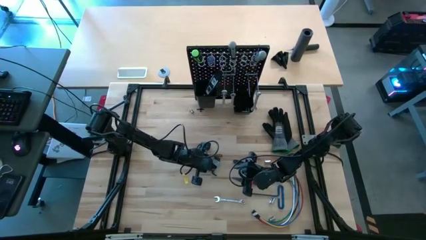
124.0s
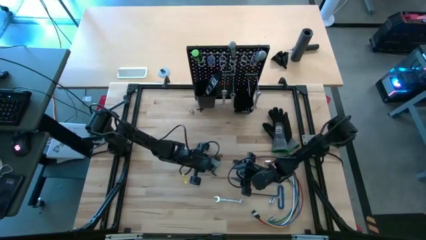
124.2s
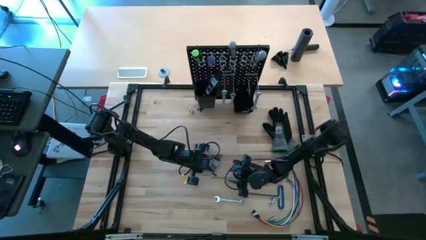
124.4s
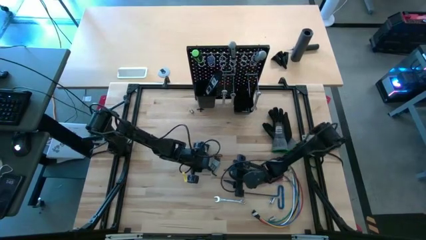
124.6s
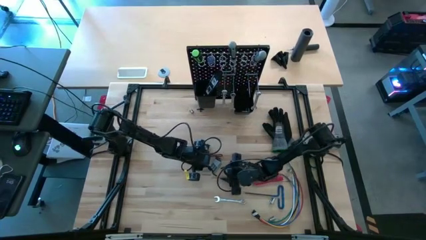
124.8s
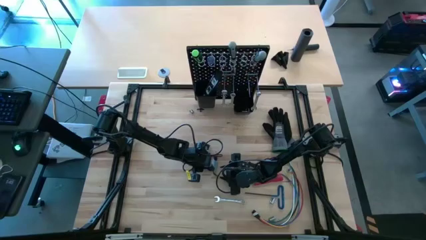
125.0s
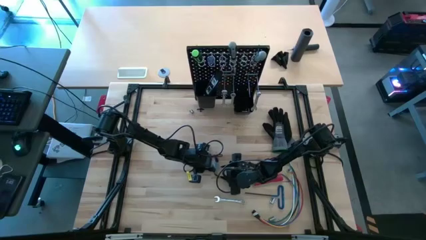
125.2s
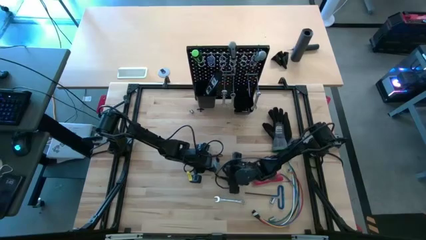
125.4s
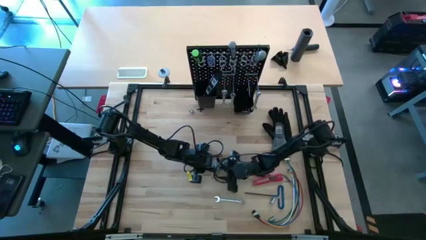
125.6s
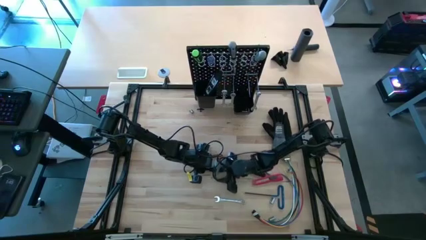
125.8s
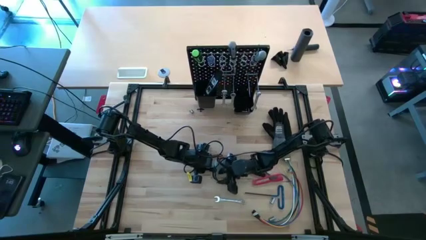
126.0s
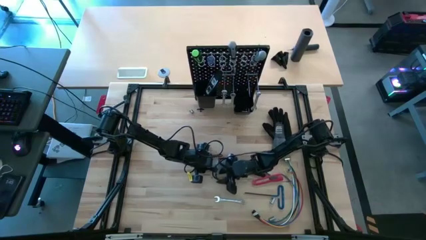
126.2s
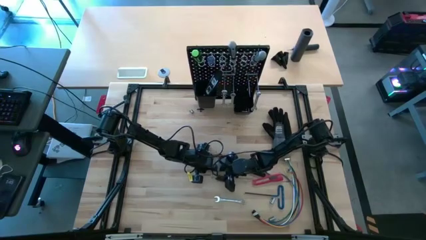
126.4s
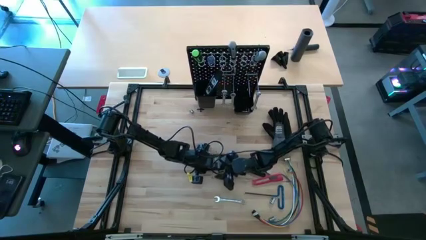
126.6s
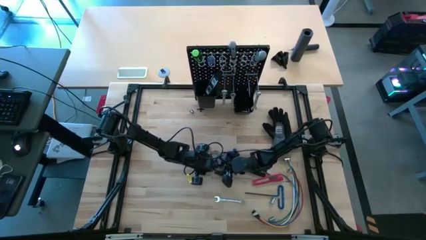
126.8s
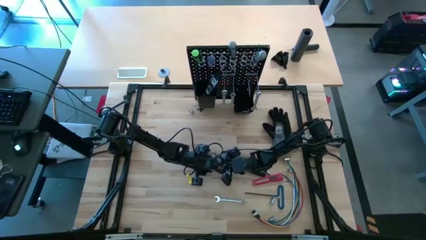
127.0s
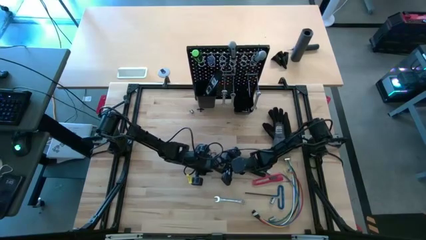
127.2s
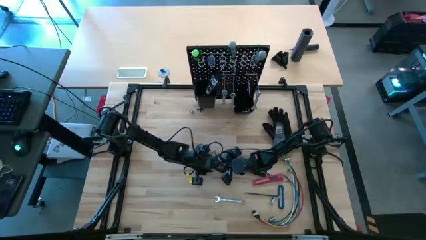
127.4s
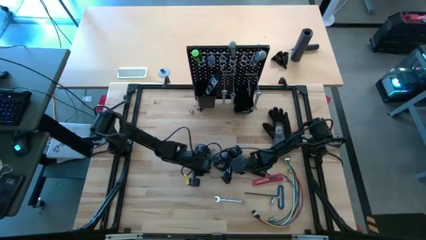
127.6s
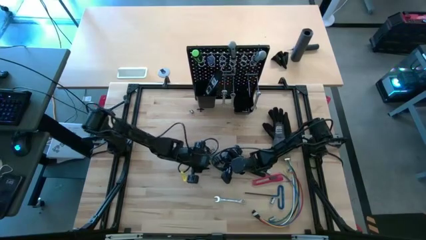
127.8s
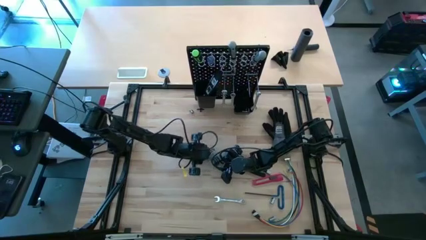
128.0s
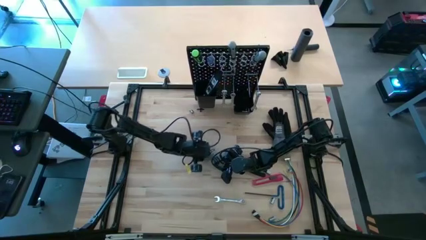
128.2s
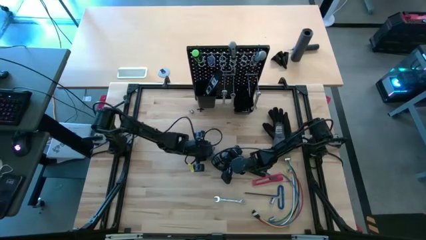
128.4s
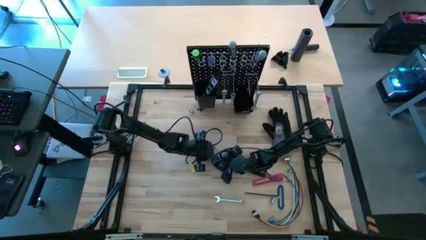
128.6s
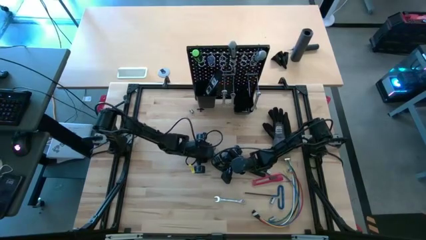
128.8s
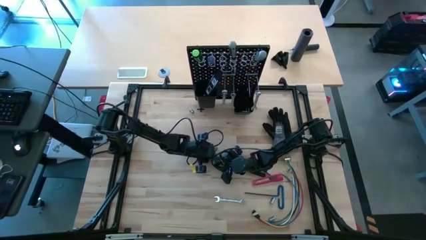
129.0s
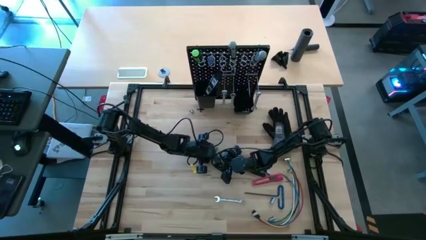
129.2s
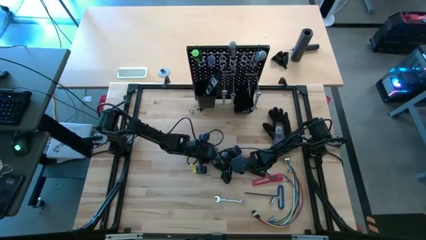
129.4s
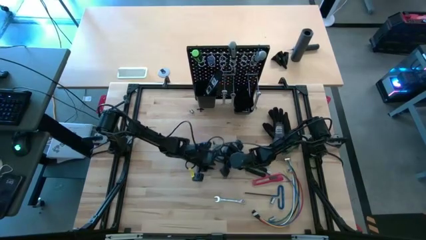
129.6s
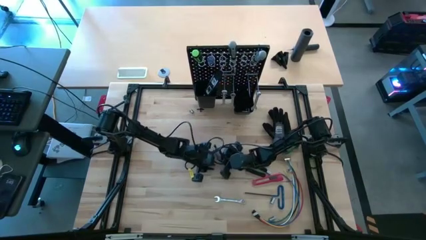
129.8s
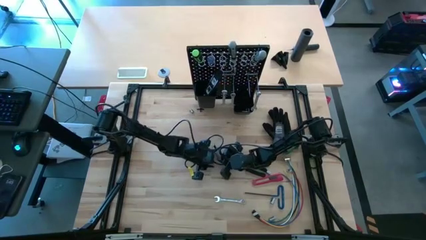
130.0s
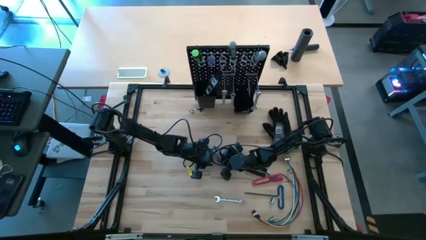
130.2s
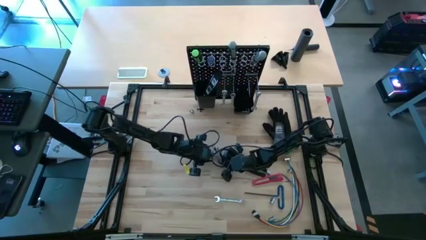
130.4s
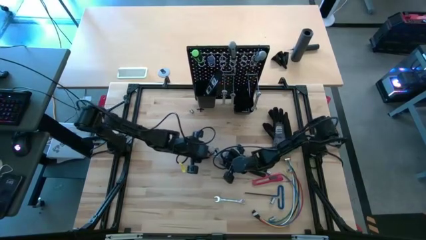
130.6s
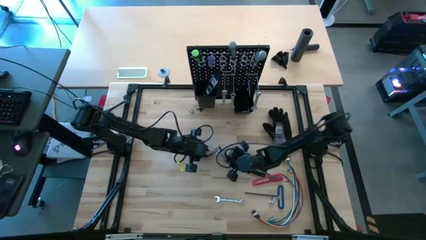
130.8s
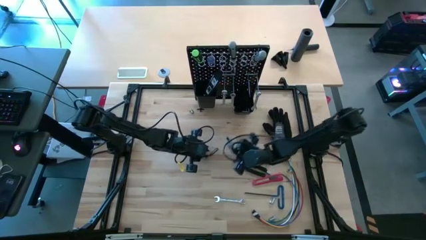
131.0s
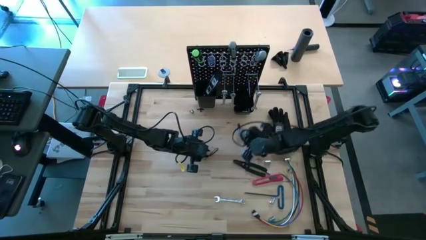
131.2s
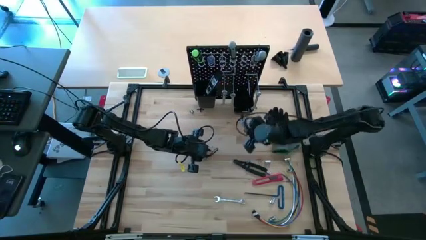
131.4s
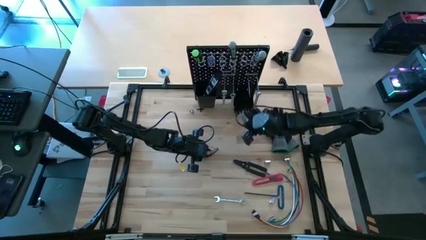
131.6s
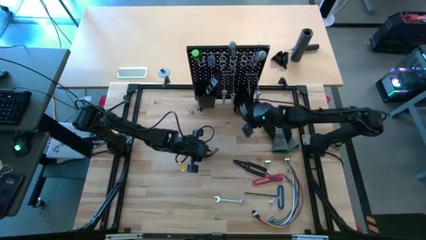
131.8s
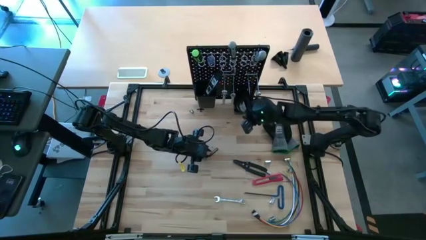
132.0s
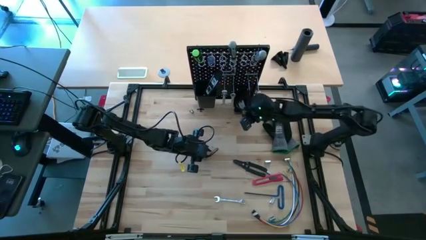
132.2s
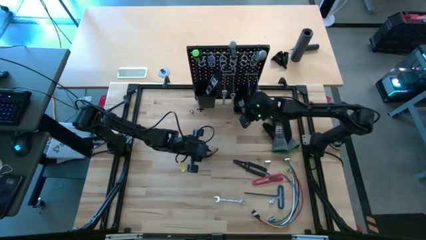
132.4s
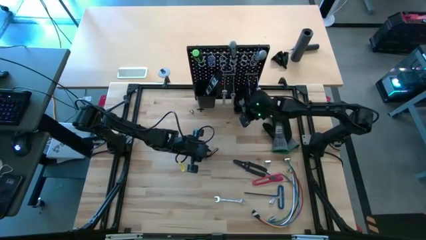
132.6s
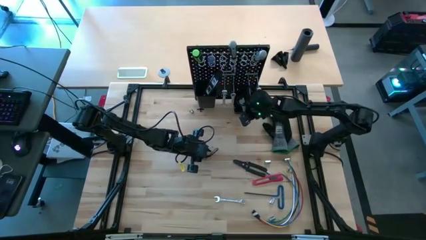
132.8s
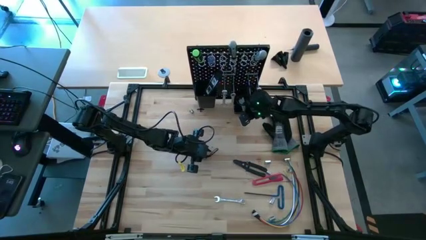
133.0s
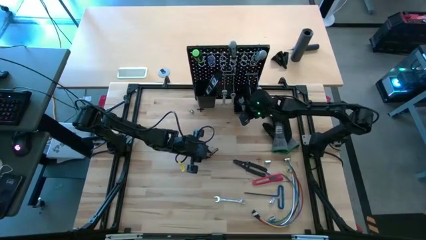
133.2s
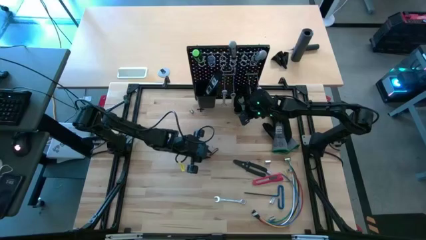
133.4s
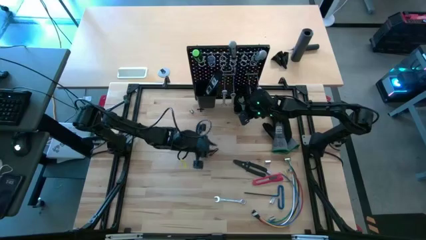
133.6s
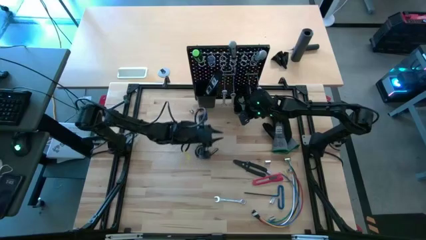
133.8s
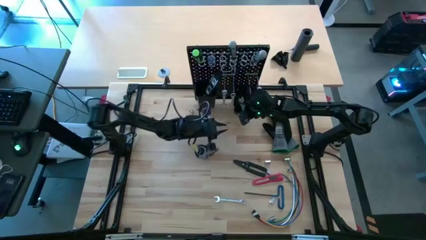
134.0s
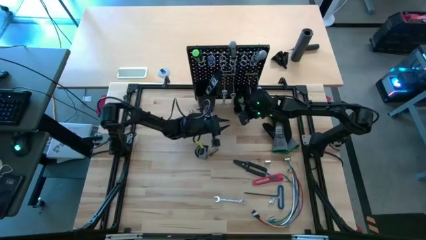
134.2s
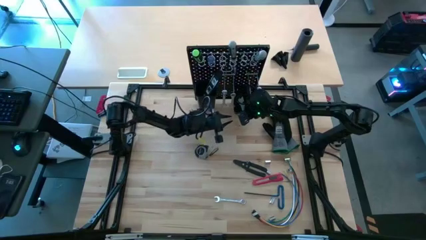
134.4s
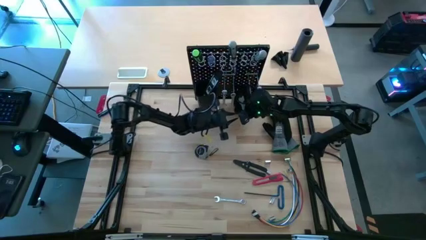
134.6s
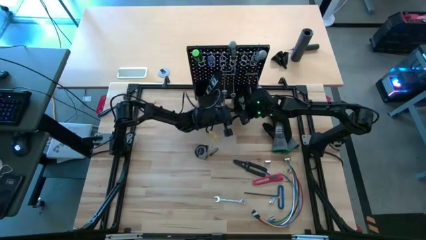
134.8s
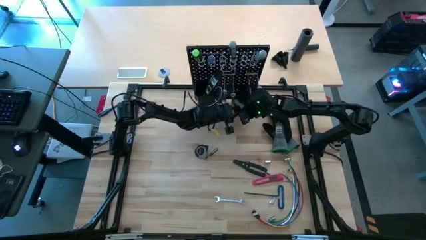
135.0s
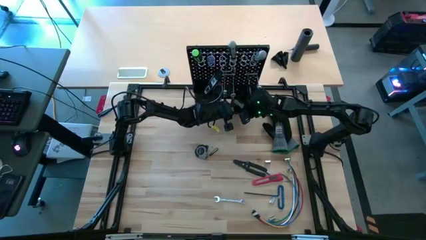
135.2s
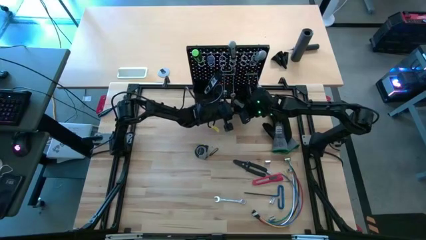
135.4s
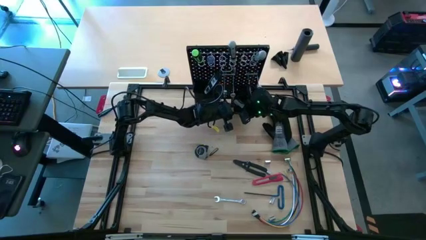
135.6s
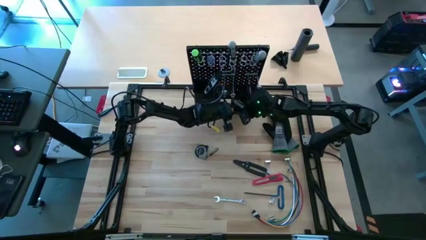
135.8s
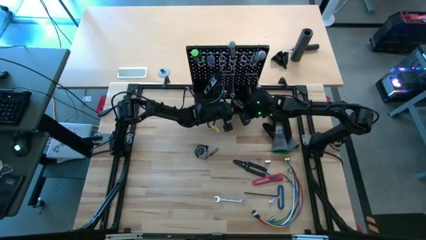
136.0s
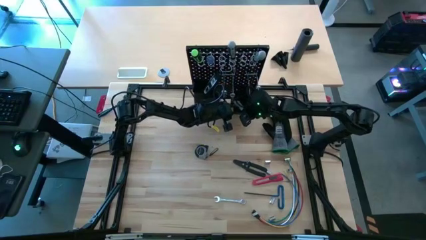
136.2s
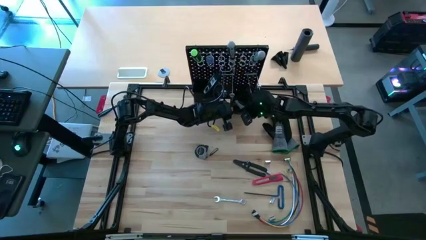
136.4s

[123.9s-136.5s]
Task: Hang tools onto peg board
Put the gray hex keys on the right black bin on the peg board
